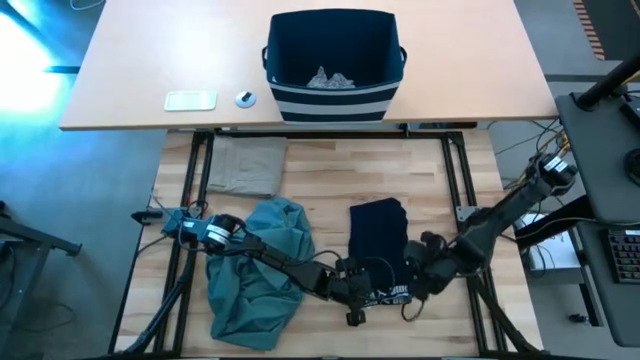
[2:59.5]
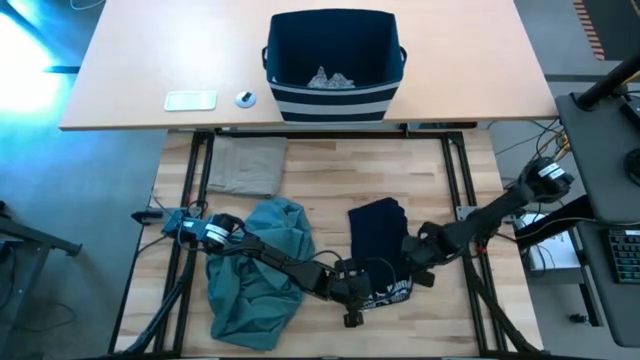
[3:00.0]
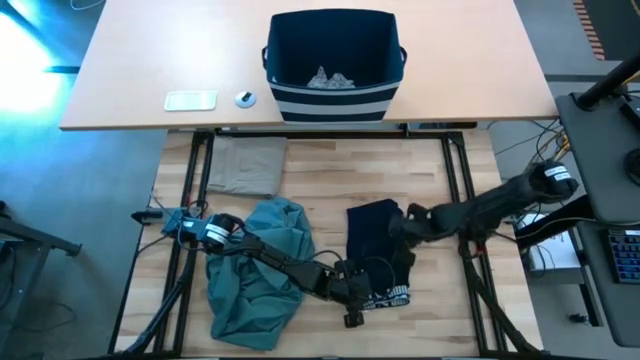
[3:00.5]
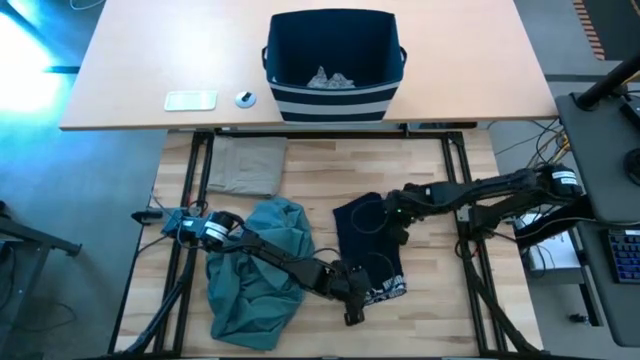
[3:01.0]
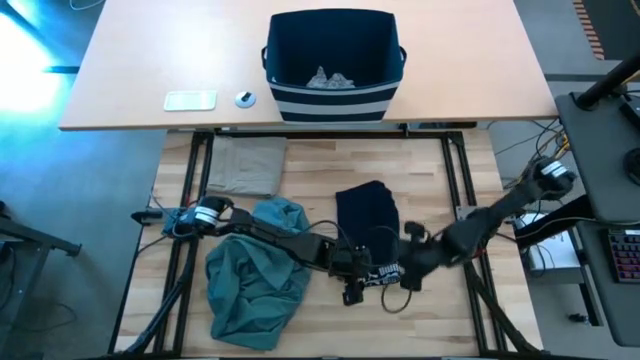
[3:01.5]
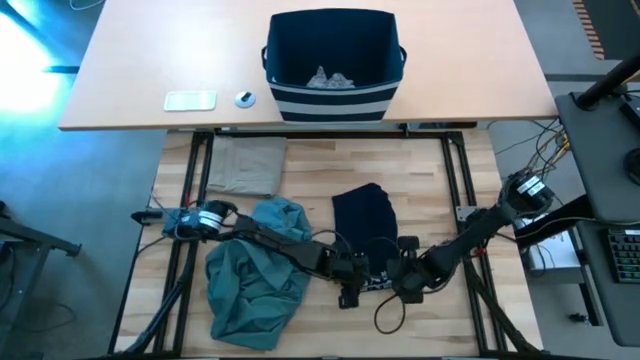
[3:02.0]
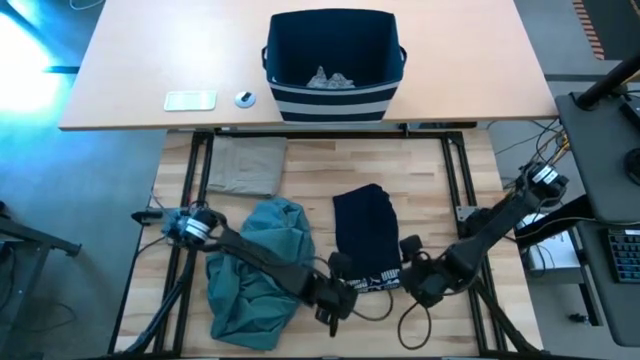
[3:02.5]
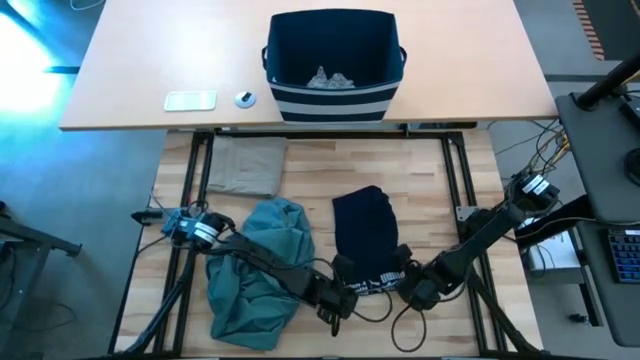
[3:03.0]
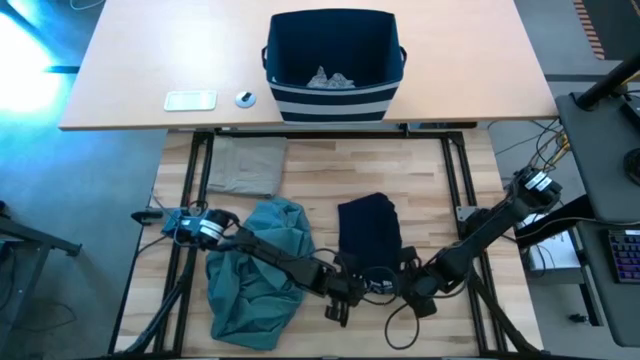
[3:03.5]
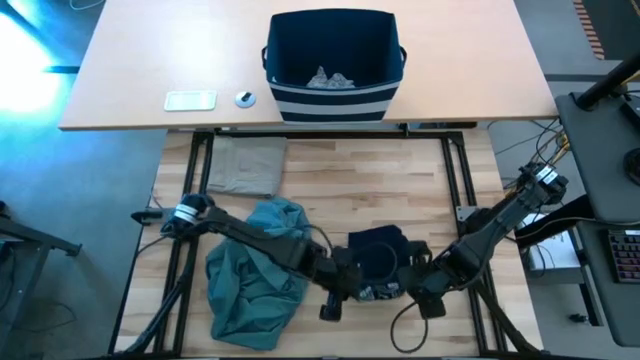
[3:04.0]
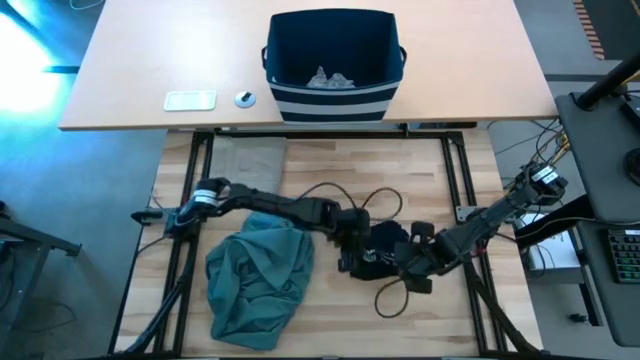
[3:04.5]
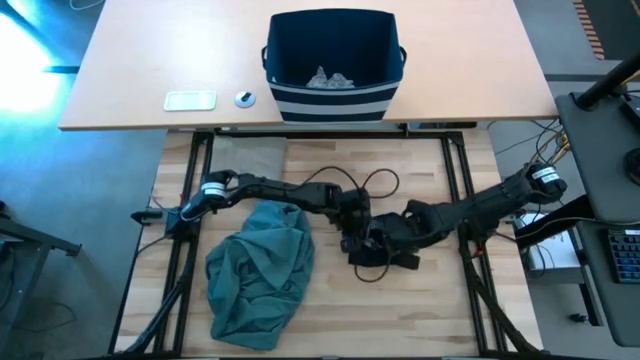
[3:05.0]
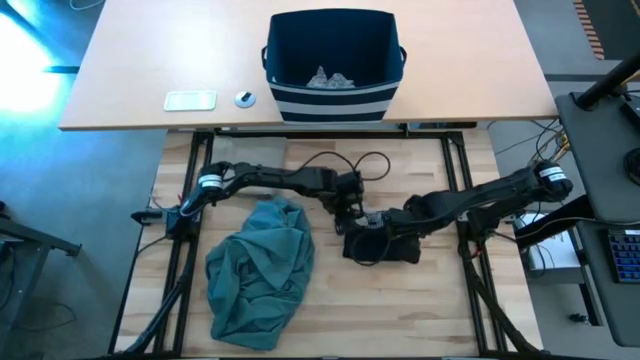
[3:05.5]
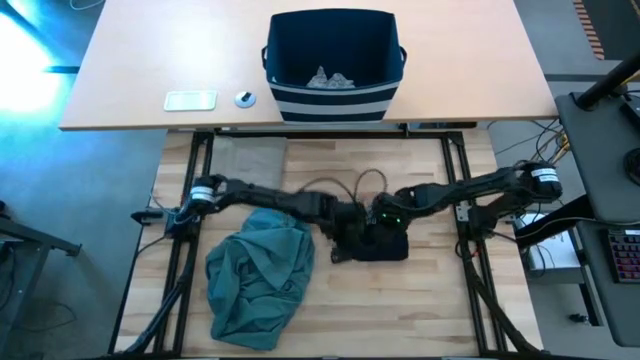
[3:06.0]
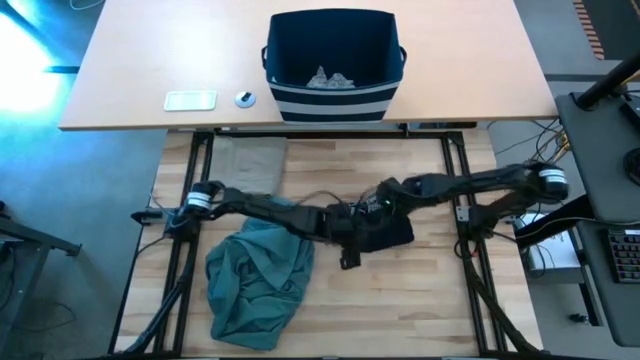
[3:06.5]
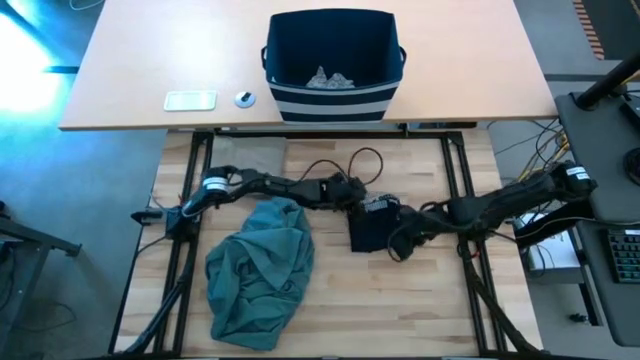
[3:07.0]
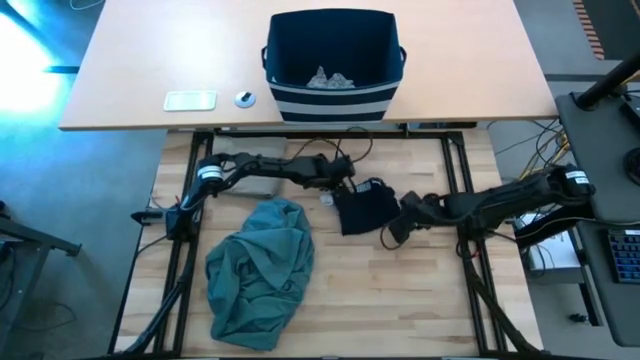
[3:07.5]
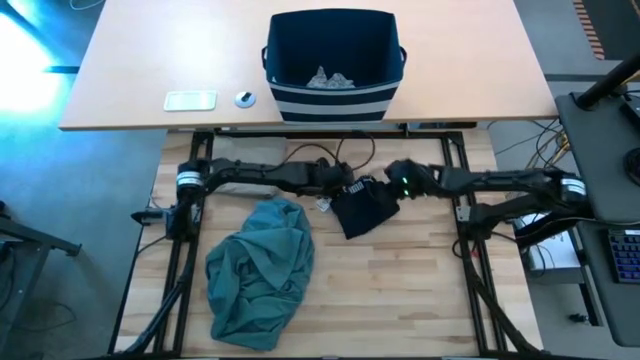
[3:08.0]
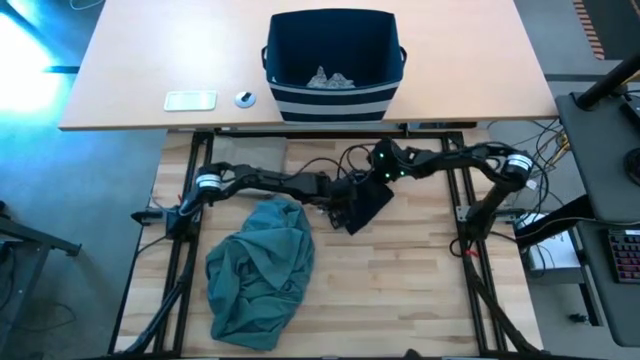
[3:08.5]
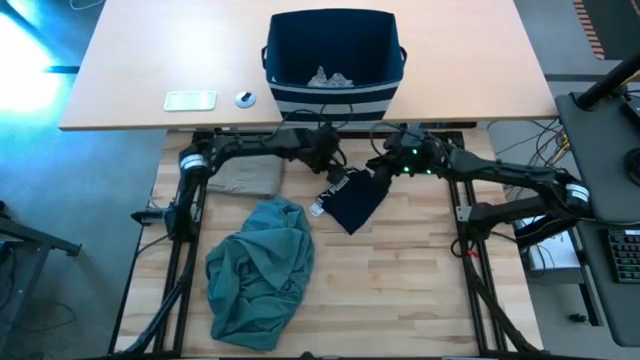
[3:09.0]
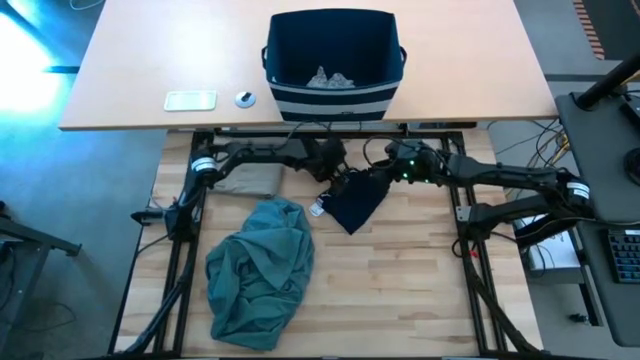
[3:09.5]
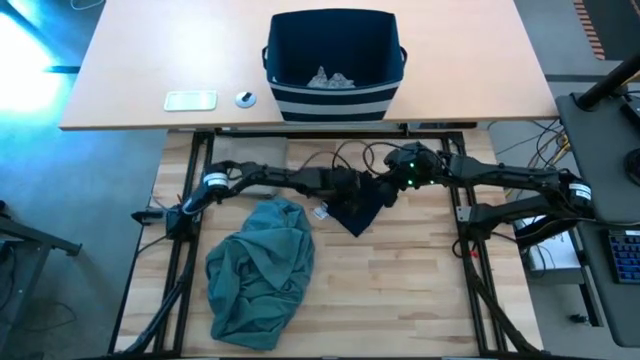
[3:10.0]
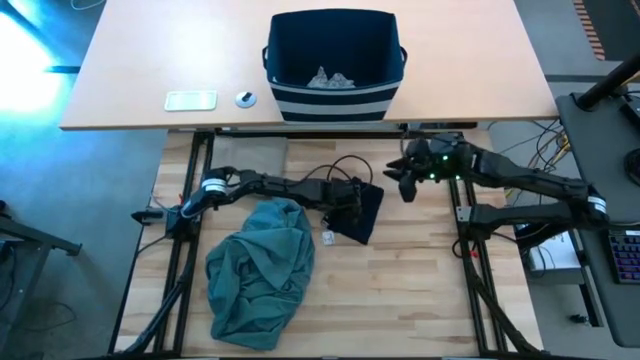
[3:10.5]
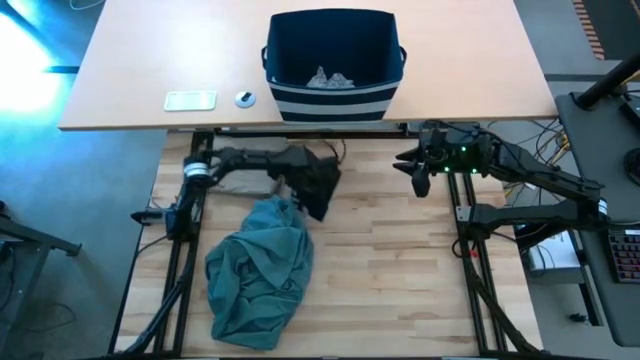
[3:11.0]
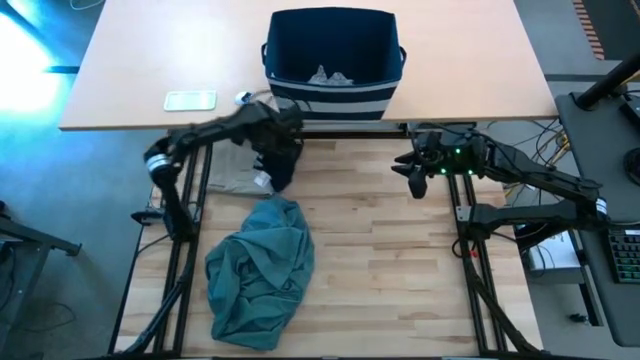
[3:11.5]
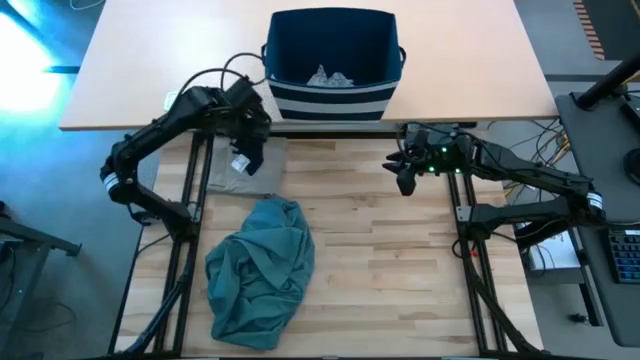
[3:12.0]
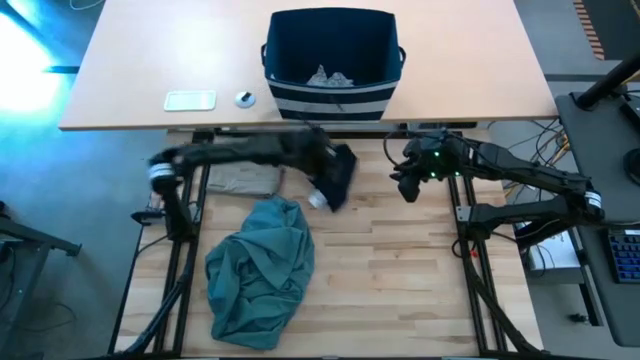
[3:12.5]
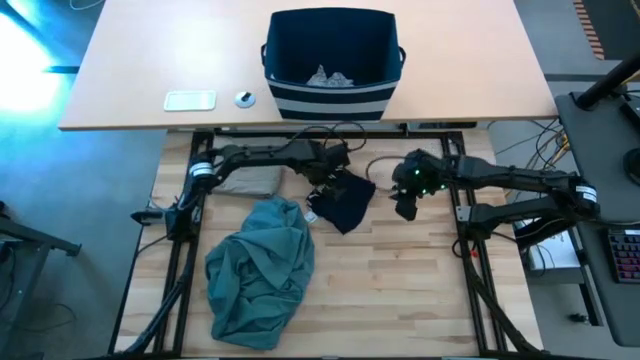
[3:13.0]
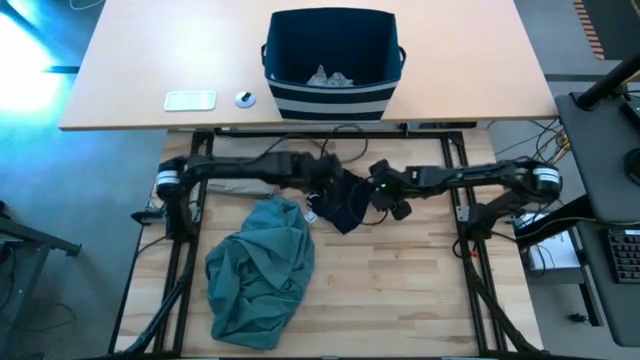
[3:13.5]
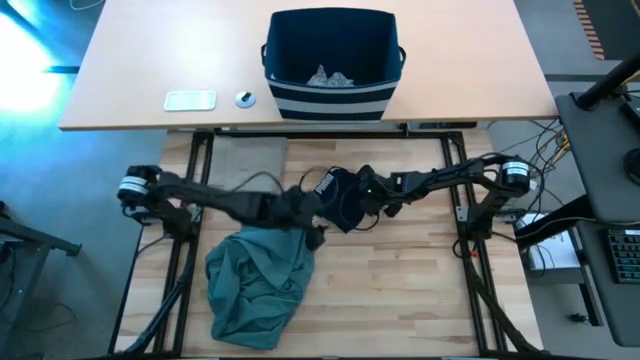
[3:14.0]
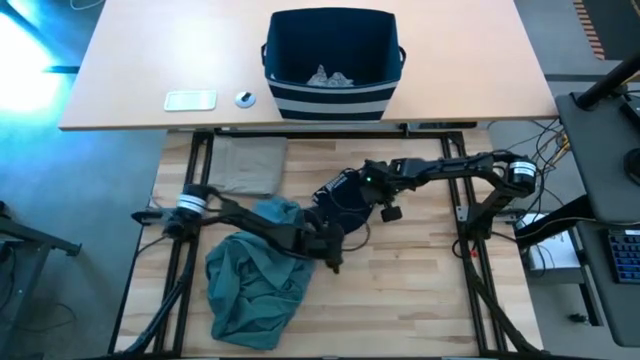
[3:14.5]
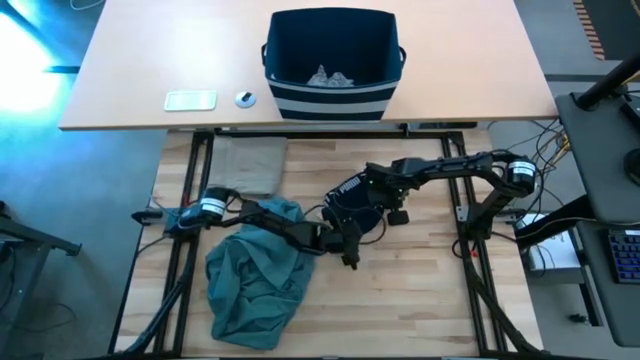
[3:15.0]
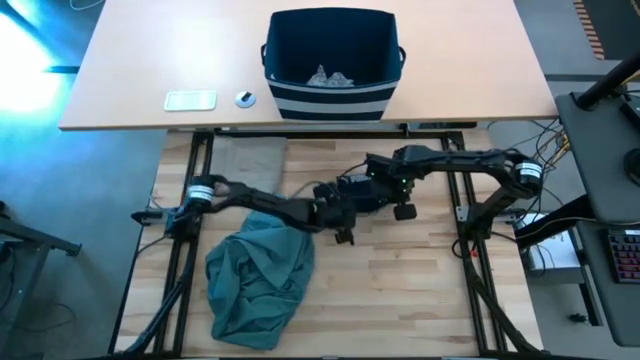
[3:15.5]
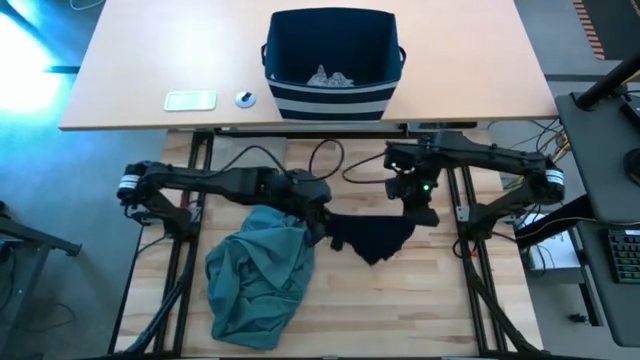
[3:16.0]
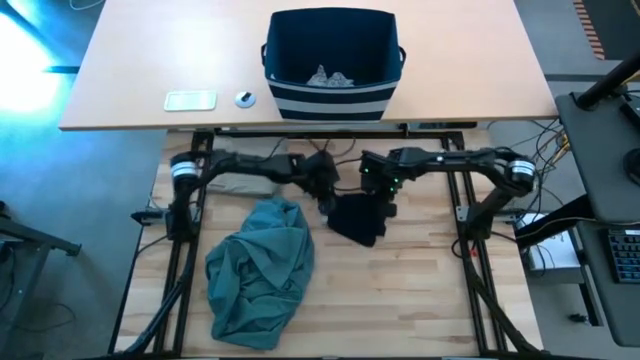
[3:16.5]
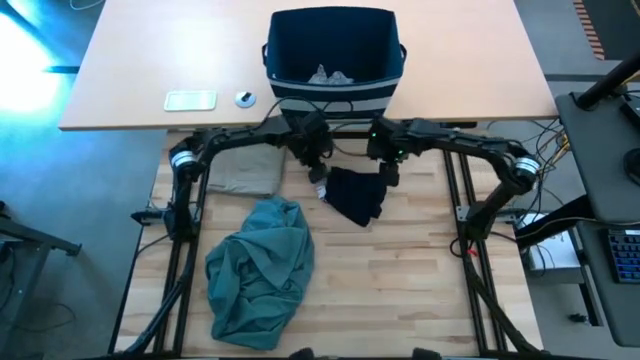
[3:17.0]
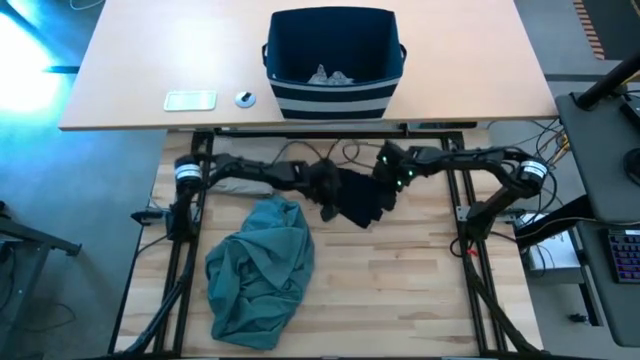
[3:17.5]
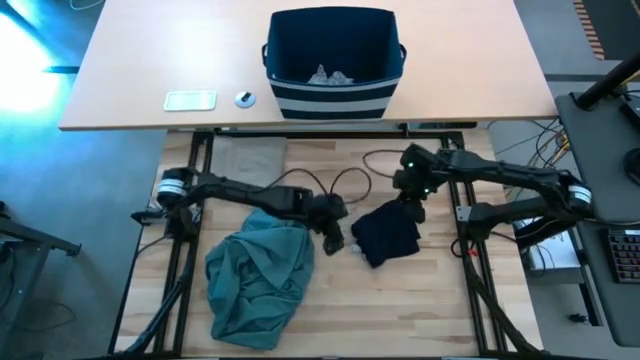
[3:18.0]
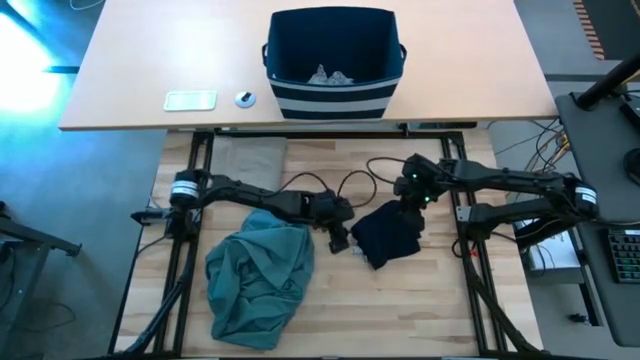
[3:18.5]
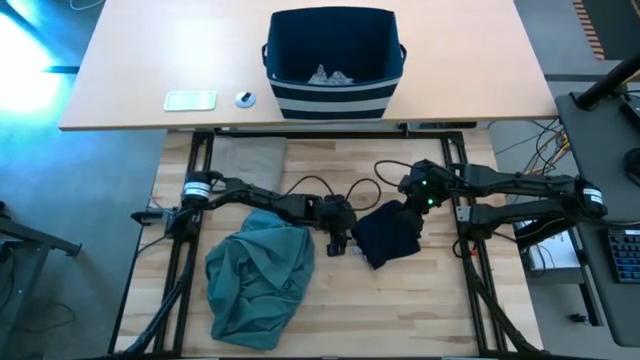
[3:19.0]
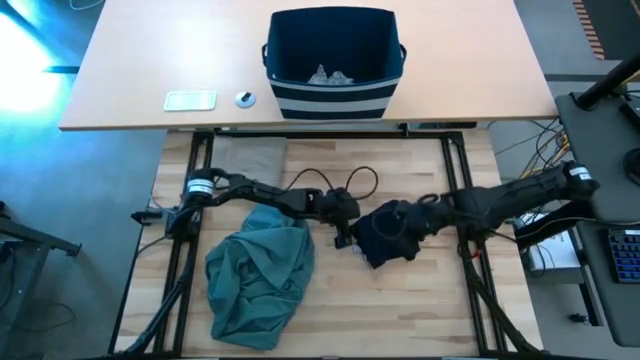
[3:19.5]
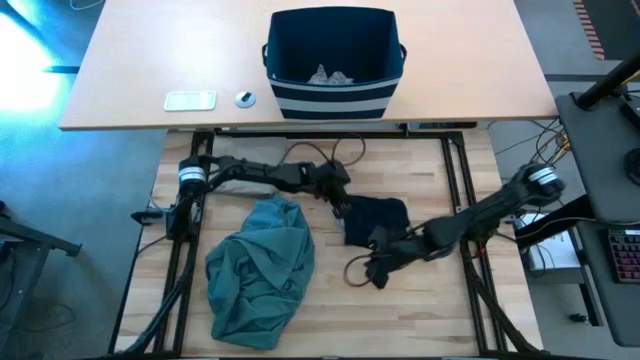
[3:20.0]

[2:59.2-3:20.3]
Task: Fold Laundry from Bin
Fold the black underwear
